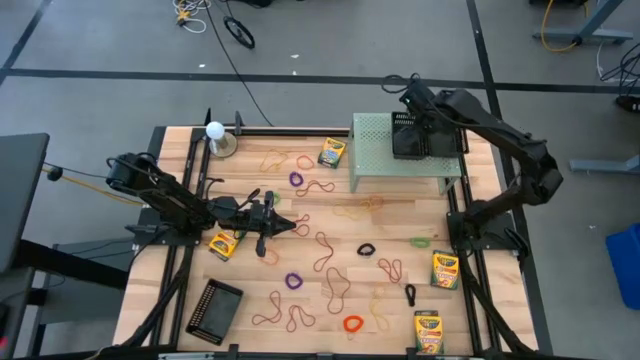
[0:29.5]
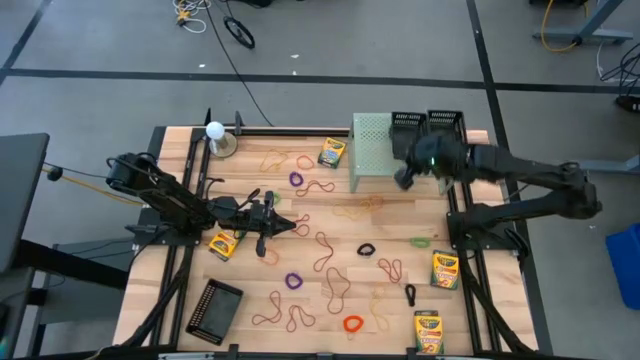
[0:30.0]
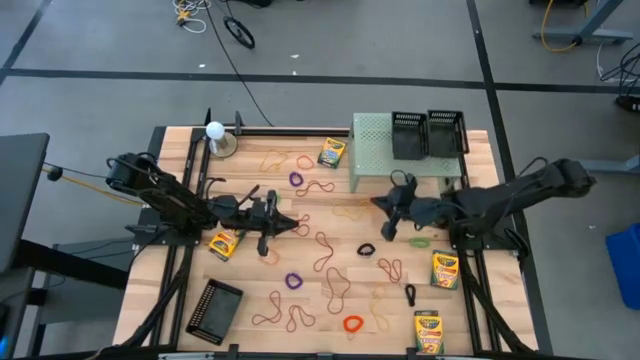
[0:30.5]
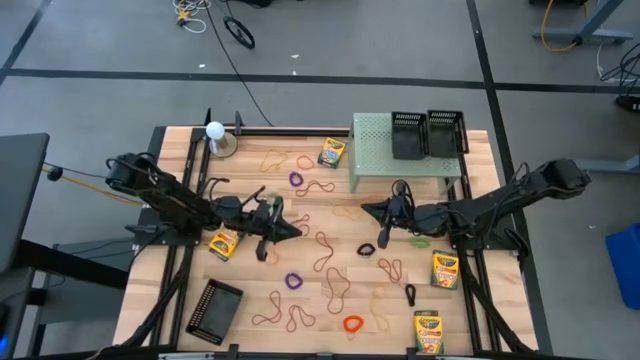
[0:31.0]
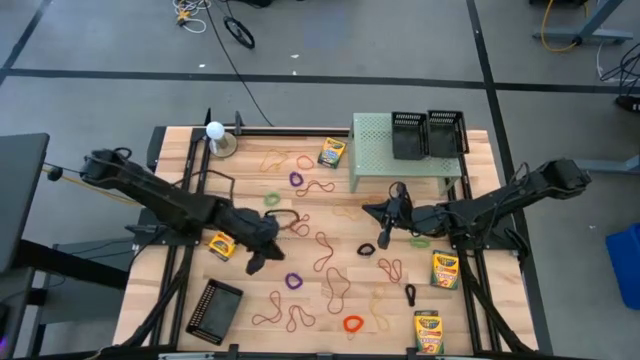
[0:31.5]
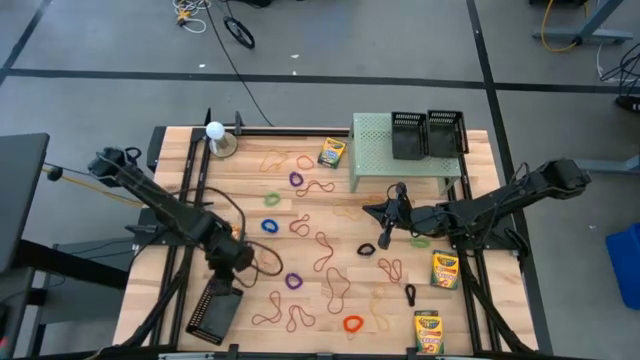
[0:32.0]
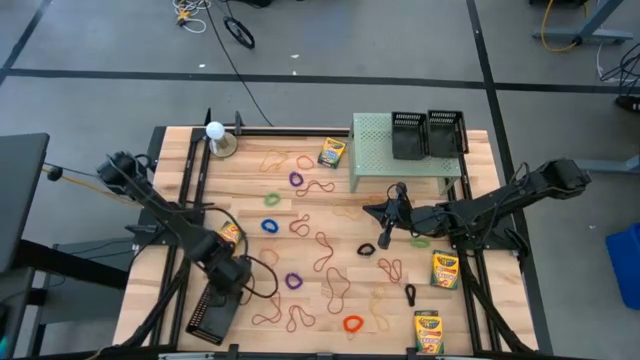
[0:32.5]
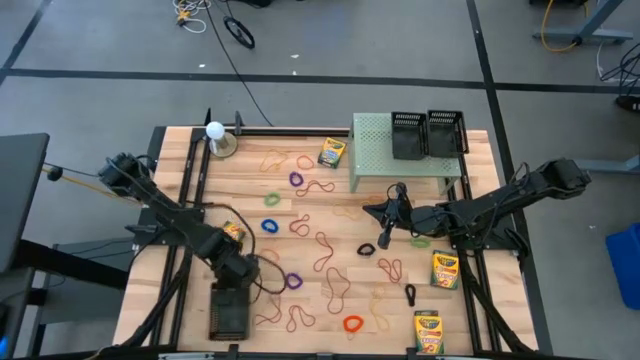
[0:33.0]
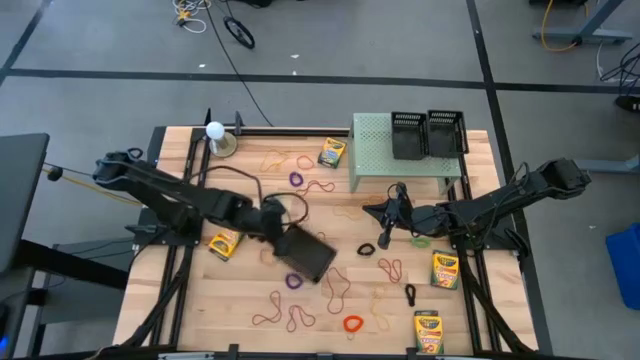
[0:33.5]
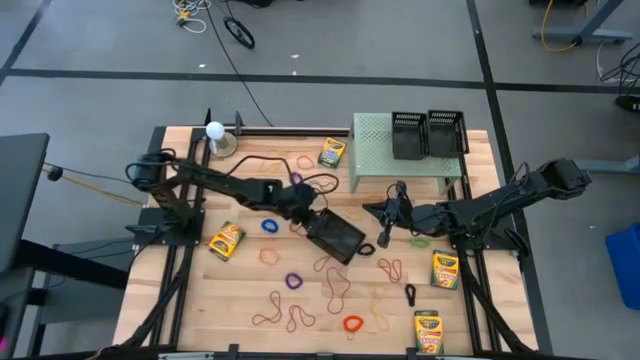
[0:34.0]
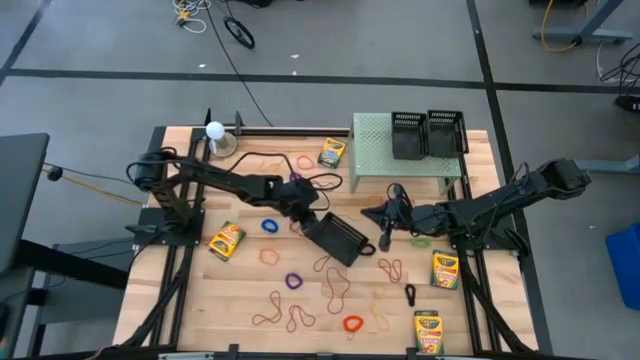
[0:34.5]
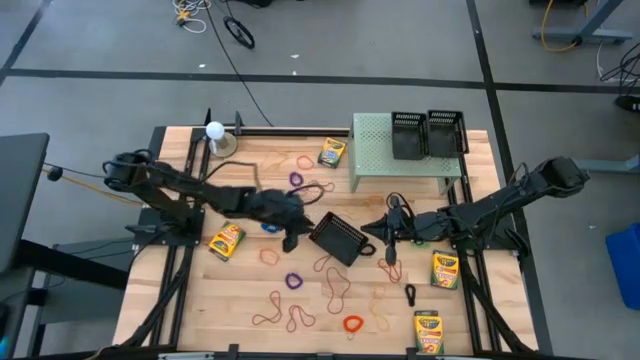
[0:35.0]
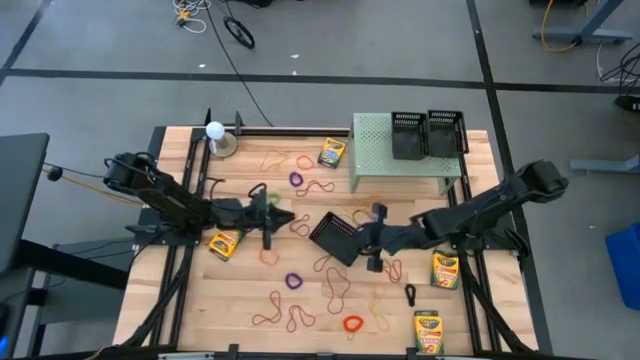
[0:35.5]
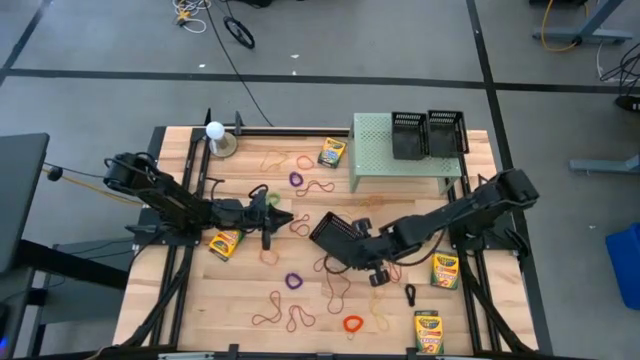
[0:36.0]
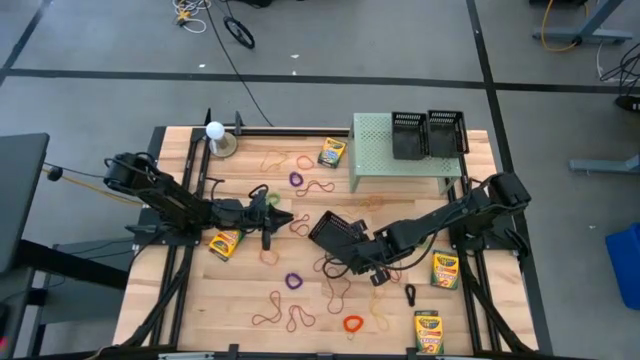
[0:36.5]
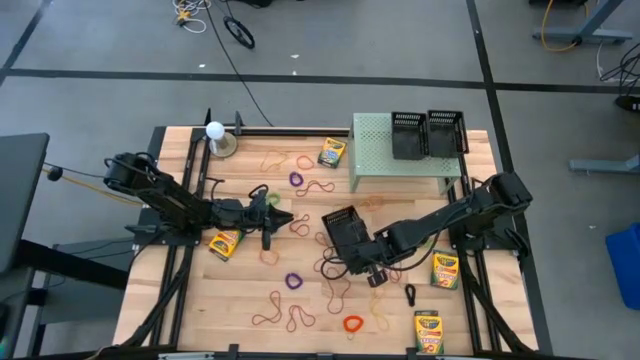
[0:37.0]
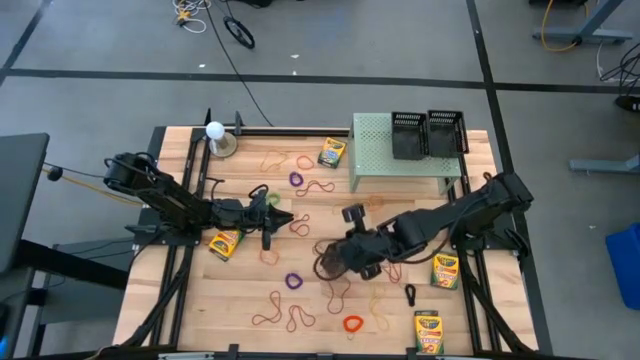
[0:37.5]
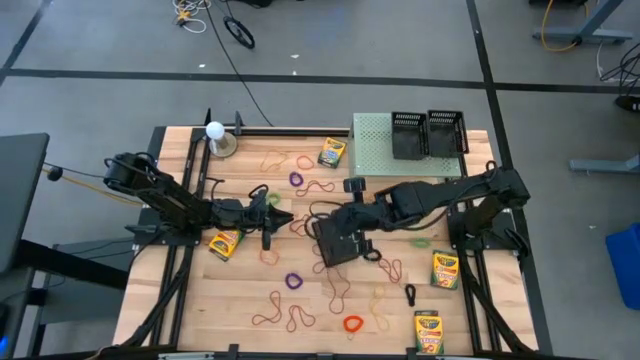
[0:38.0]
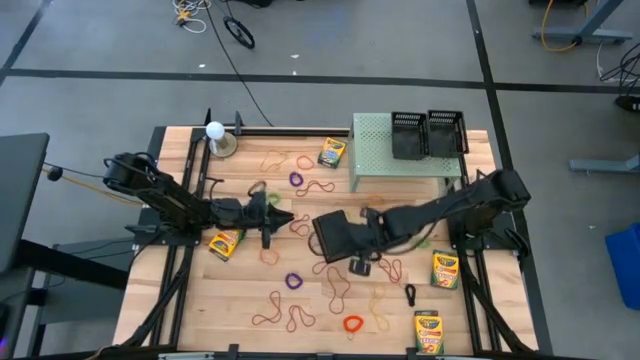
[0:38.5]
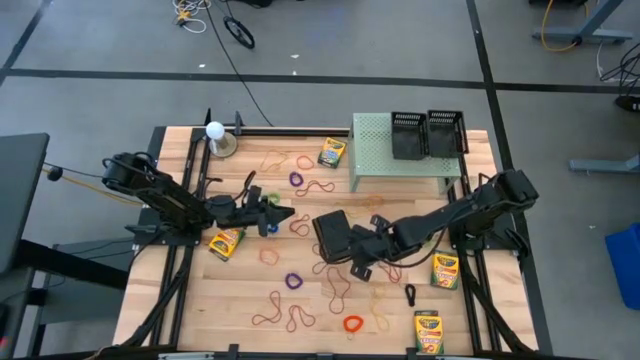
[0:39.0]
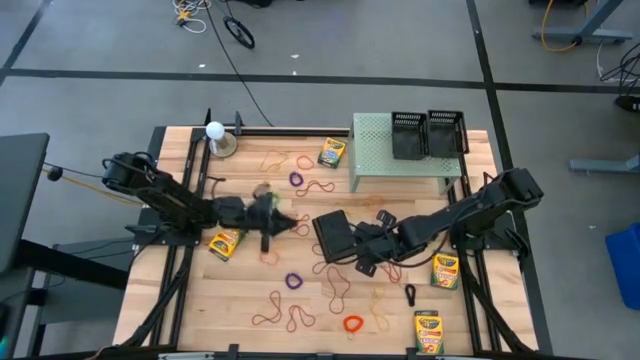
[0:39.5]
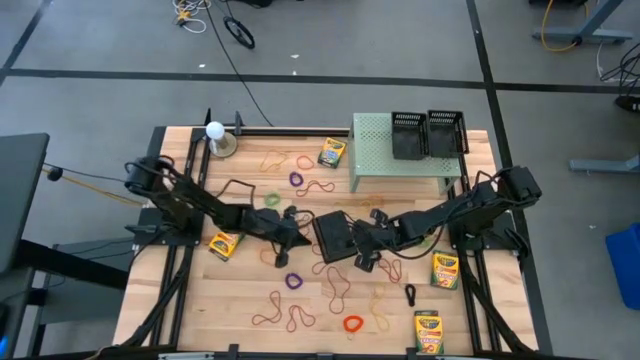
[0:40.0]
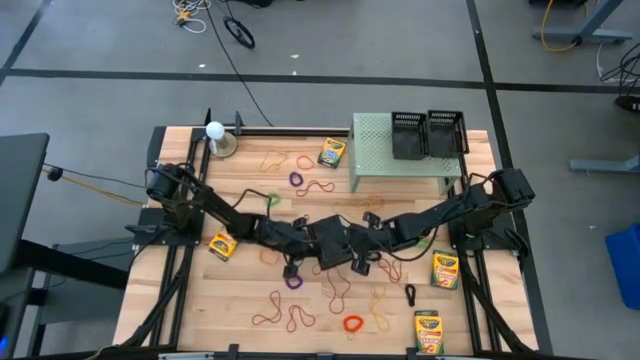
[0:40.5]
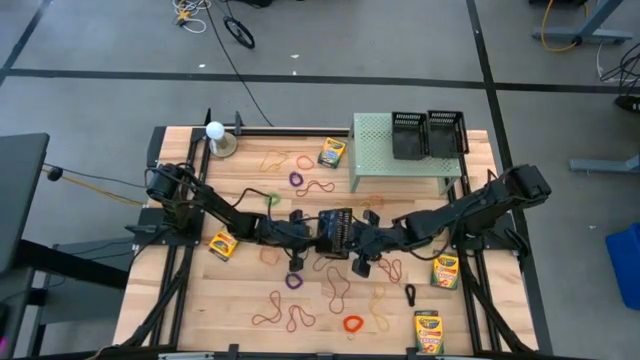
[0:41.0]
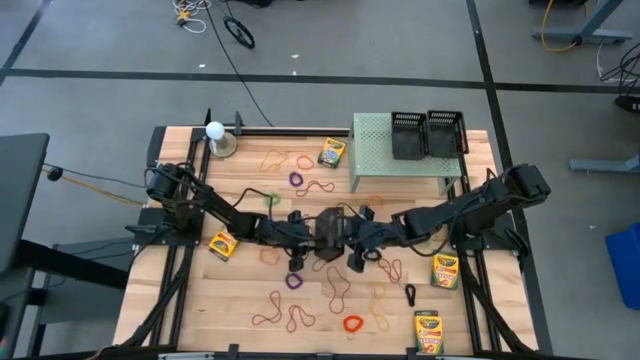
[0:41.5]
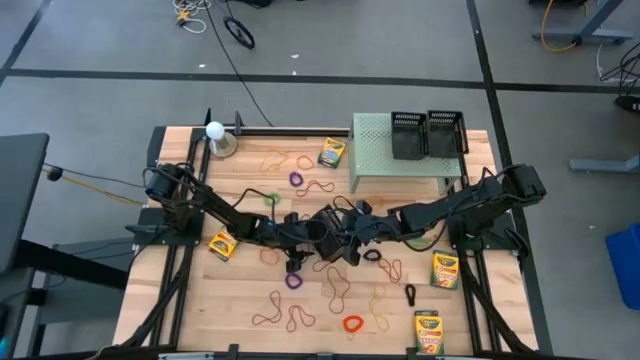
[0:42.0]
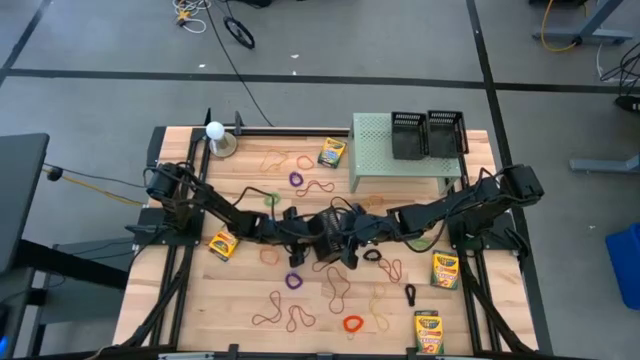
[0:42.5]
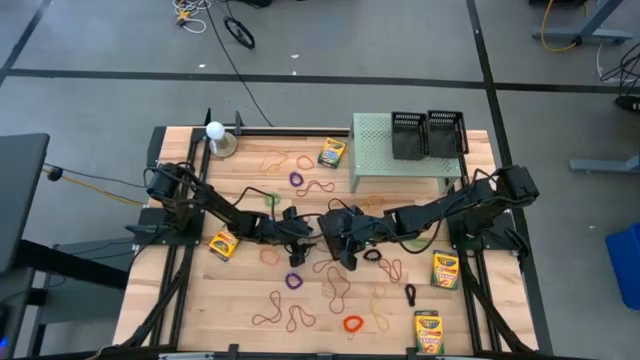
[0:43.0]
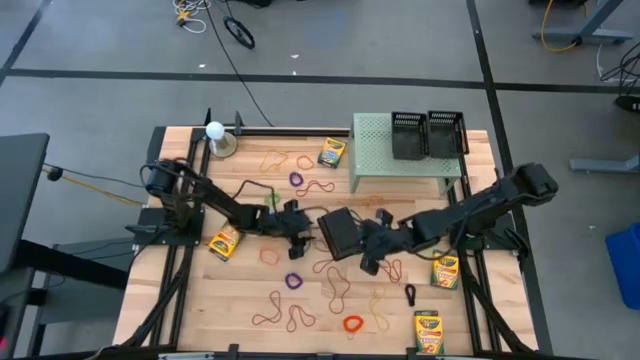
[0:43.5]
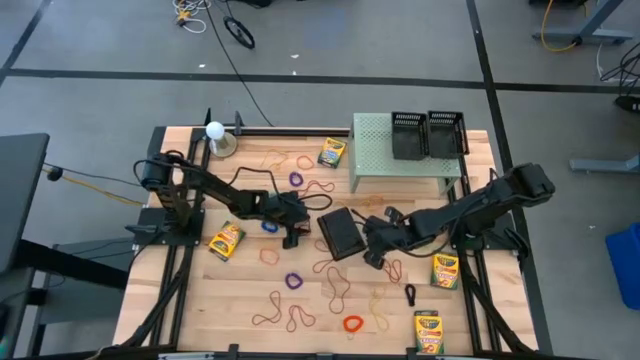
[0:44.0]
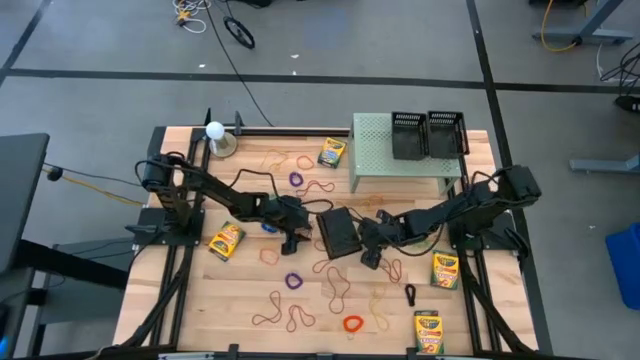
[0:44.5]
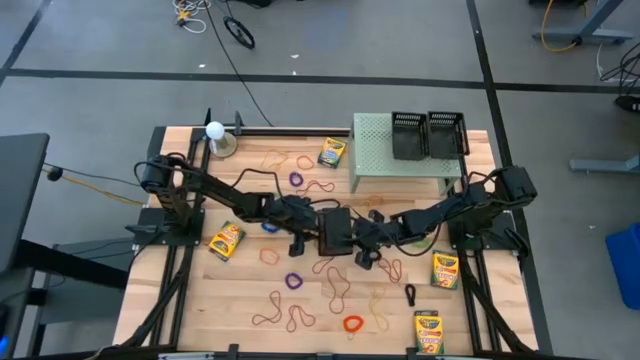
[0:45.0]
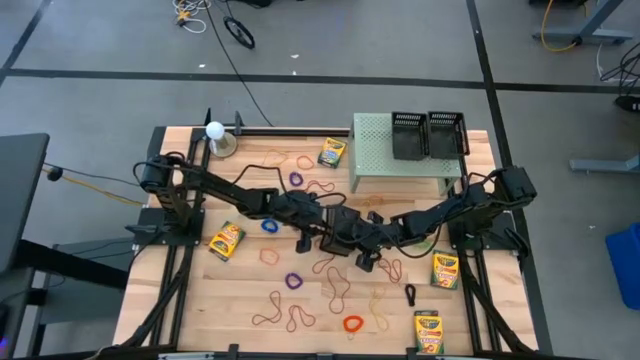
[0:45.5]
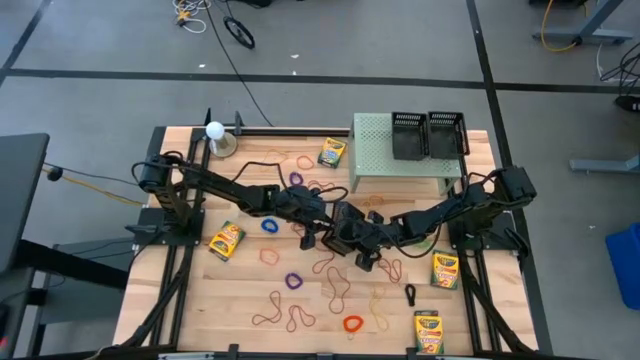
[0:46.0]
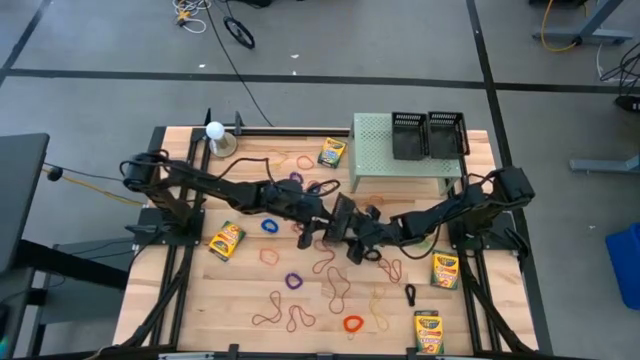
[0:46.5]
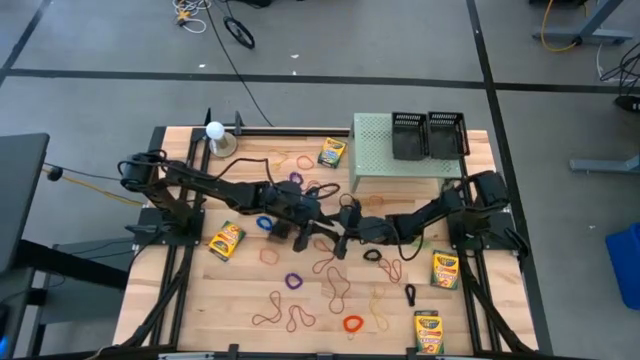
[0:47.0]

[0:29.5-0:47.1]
Task: Pick & Place Office Desk Supplies
Put the black basket on the shelf

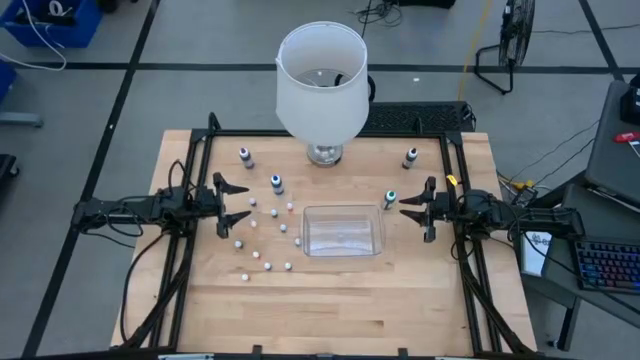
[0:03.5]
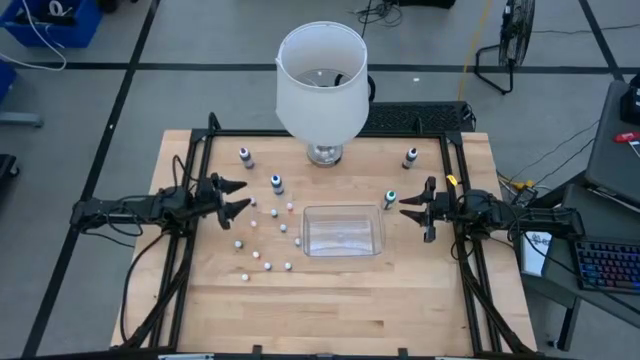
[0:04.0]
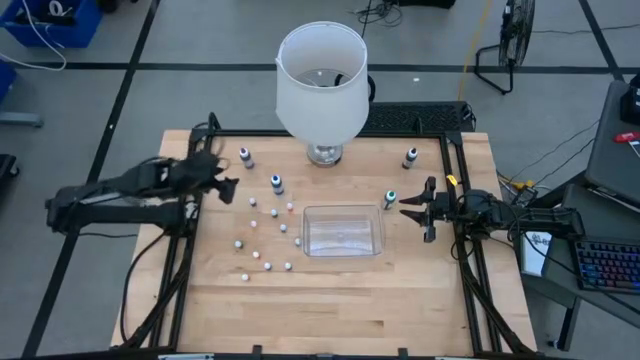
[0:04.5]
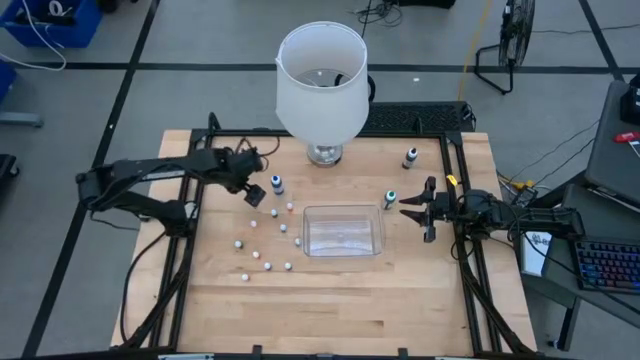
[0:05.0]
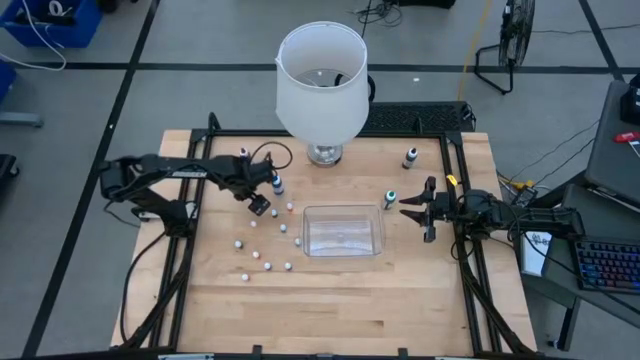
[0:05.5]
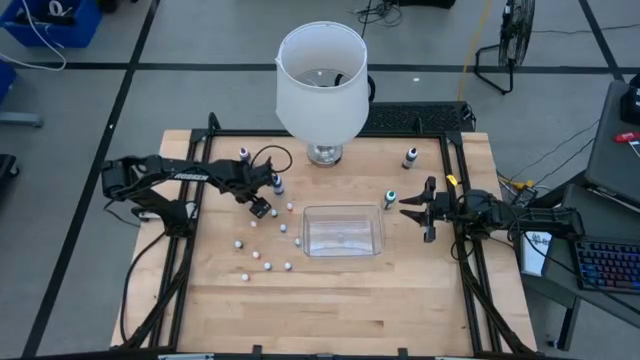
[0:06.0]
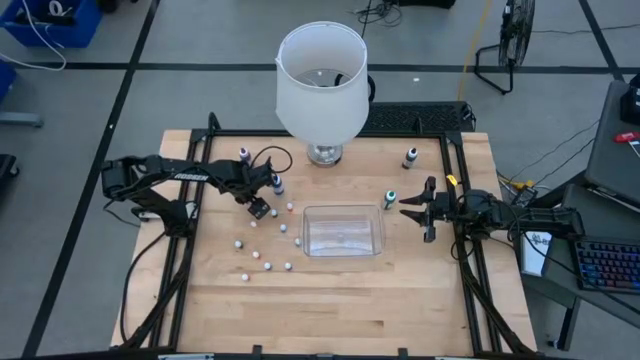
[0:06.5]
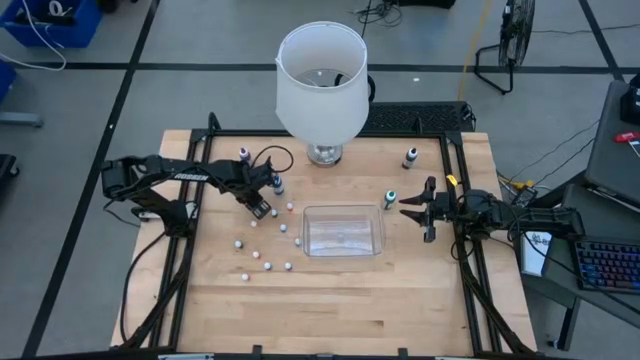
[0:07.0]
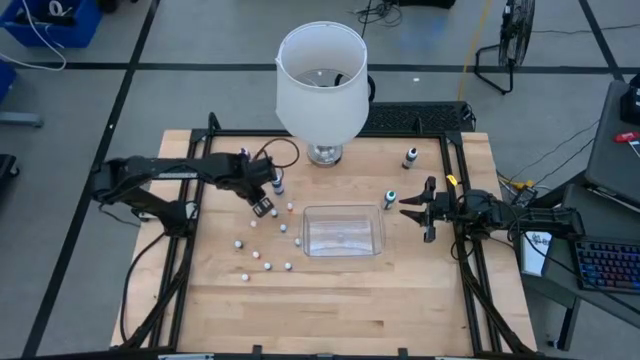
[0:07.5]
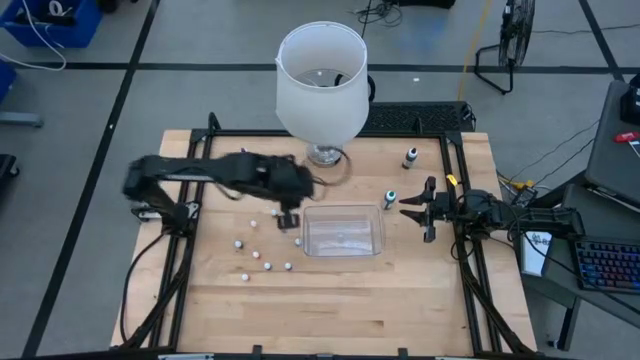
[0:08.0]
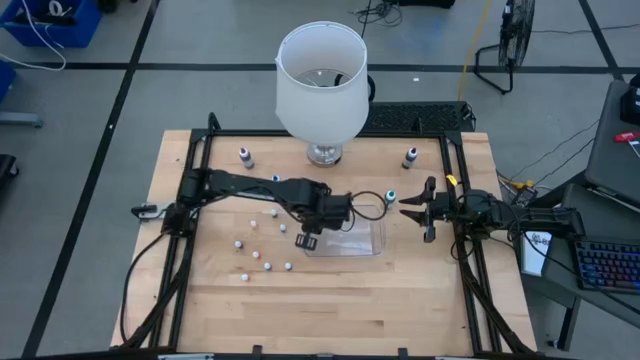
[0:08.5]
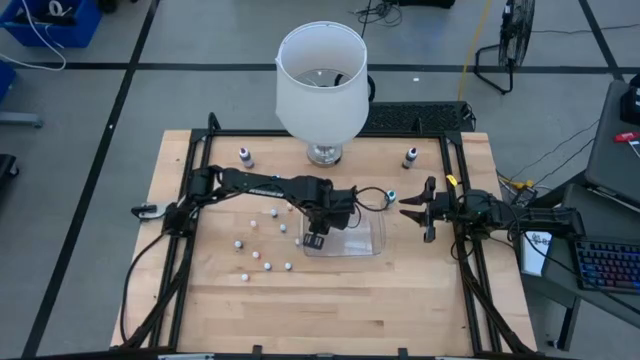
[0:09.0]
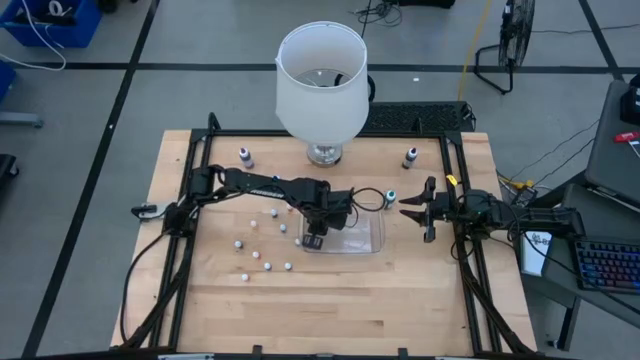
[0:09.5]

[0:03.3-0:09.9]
Task: Pick & Place food coloring
Put the orange food coloring bottle into the transparent bin
